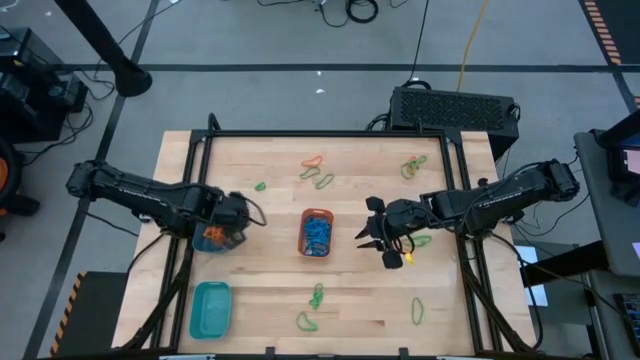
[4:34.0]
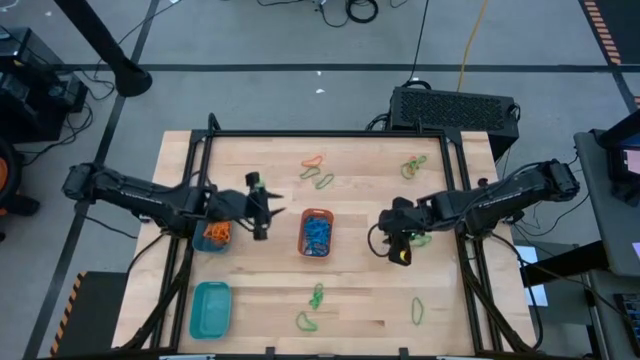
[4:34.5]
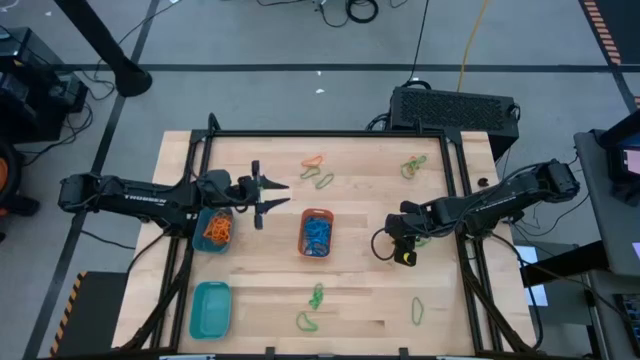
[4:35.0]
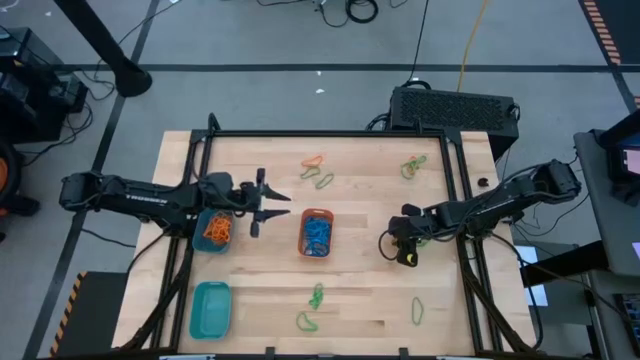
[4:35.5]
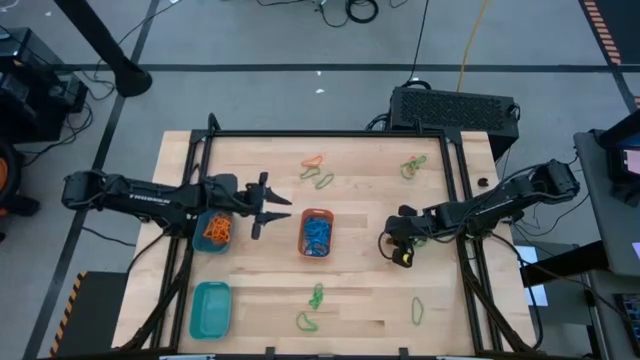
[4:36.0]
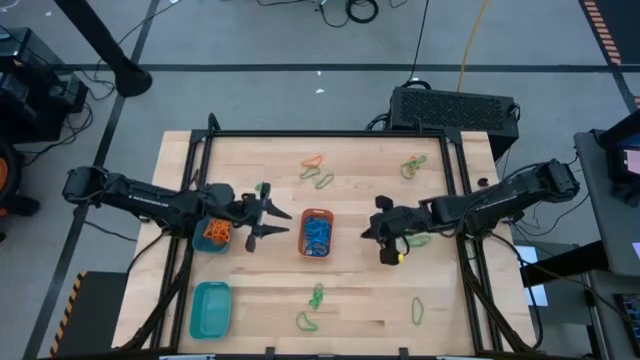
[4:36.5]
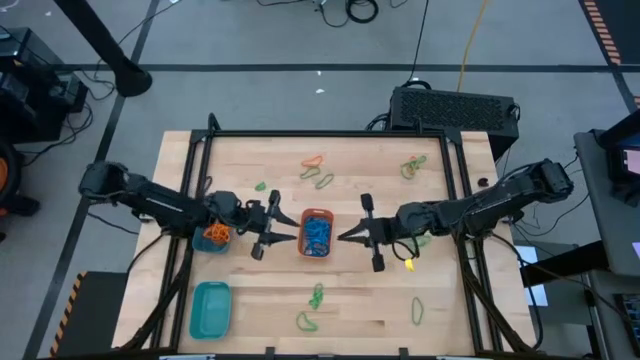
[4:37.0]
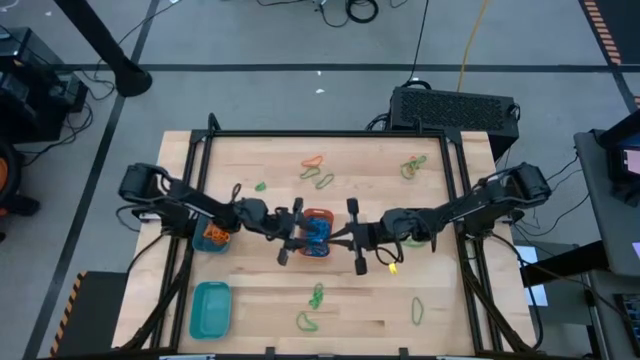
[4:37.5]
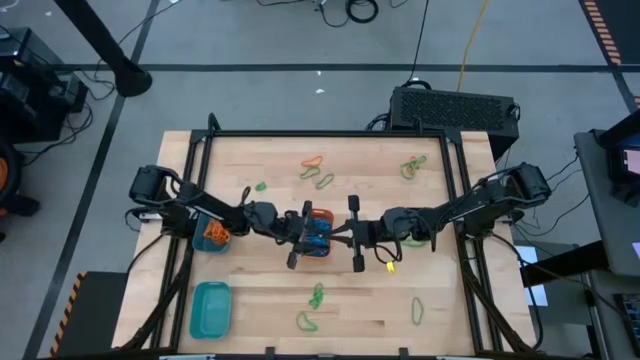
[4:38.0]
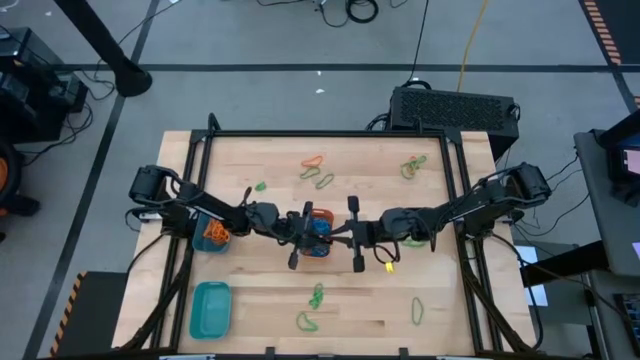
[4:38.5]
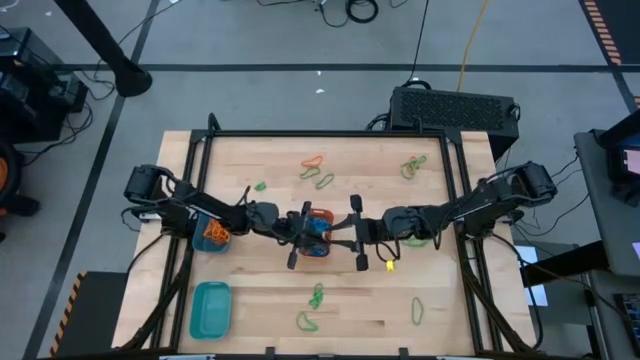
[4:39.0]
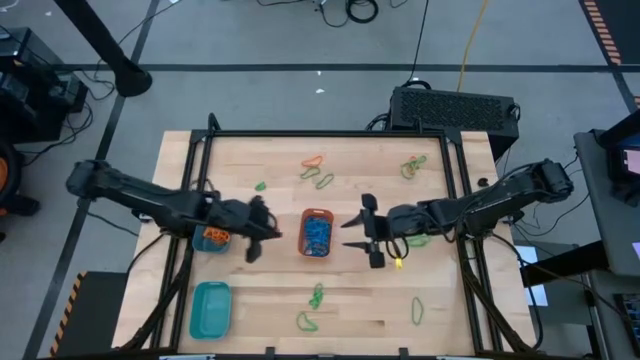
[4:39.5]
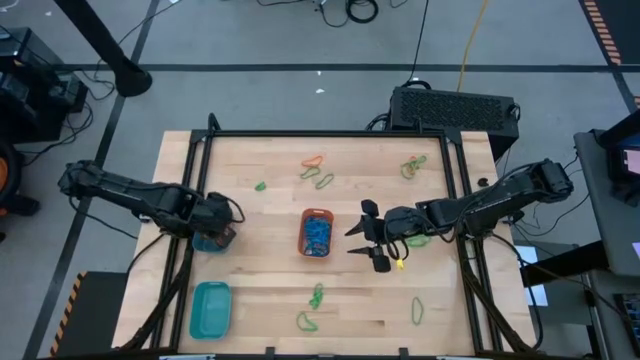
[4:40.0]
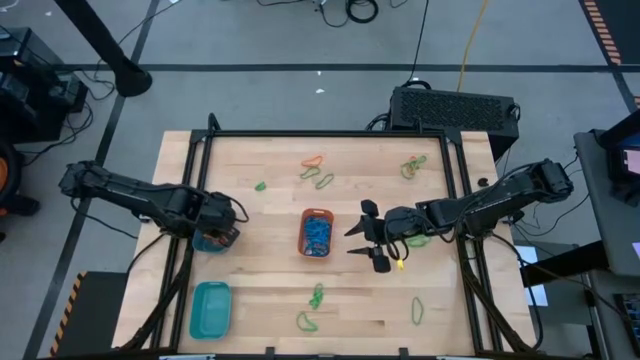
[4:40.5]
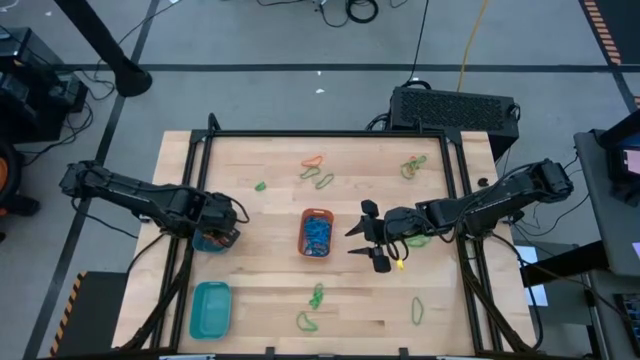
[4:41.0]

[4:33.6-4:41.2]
Task: Sort rubber bands into baskets
Put the orange rubber band into the blue bin

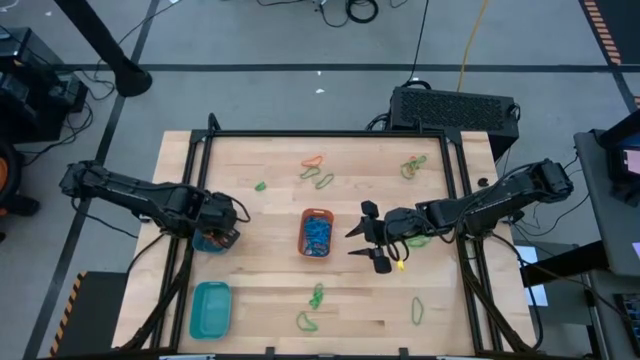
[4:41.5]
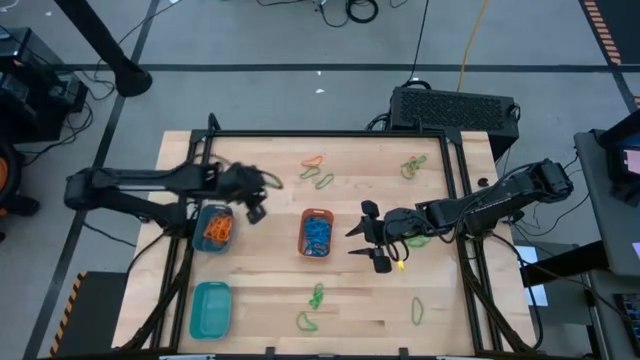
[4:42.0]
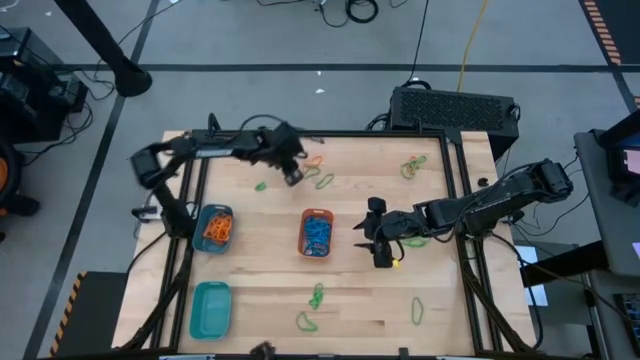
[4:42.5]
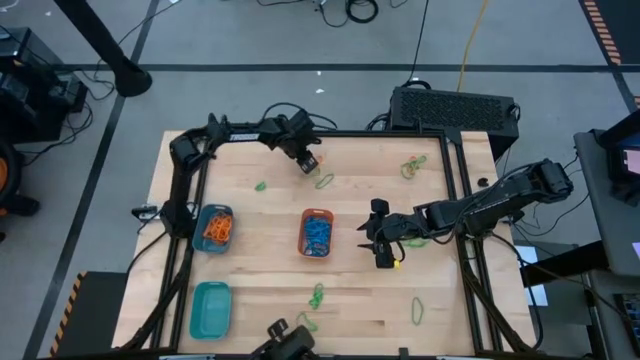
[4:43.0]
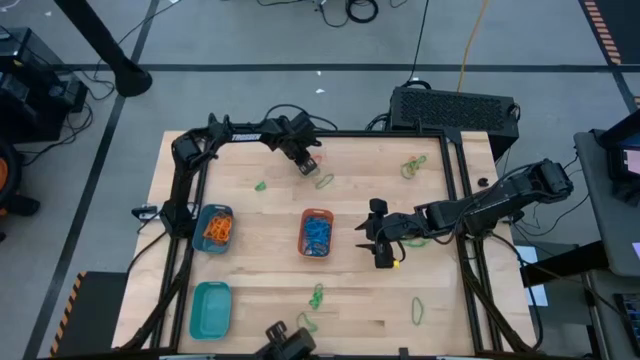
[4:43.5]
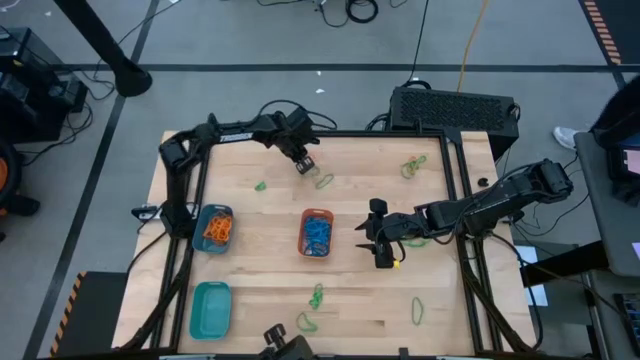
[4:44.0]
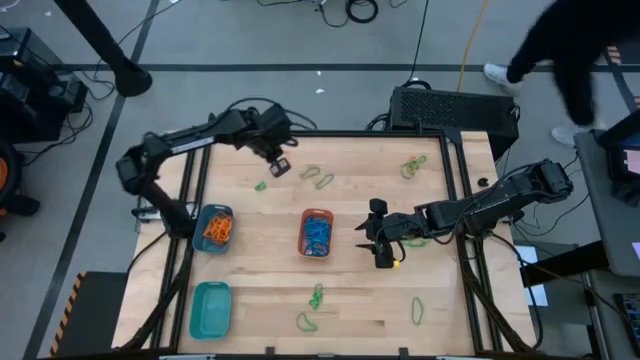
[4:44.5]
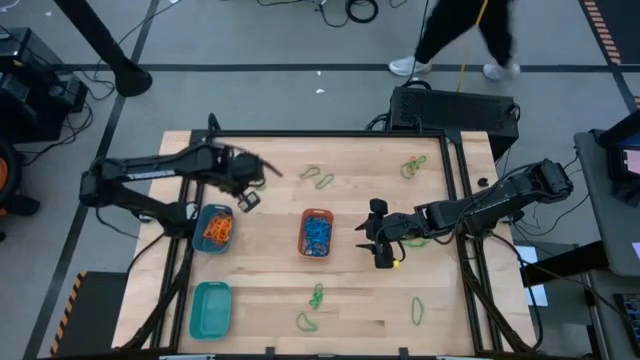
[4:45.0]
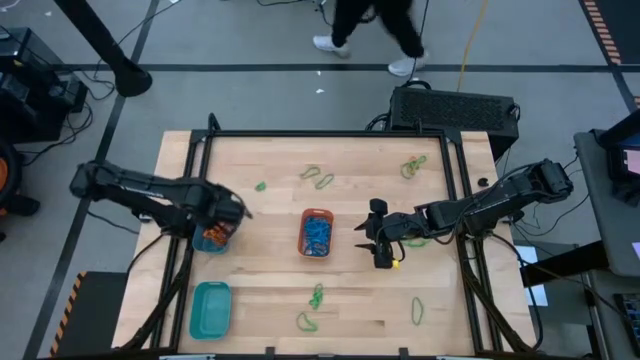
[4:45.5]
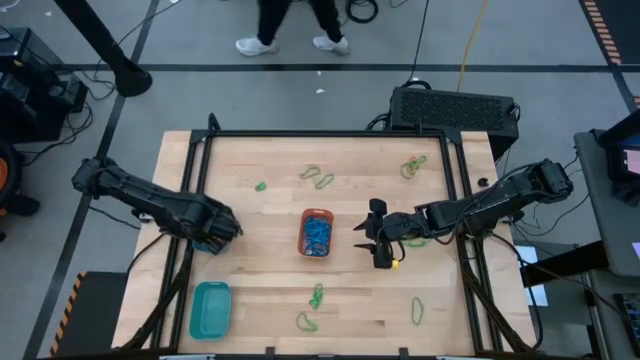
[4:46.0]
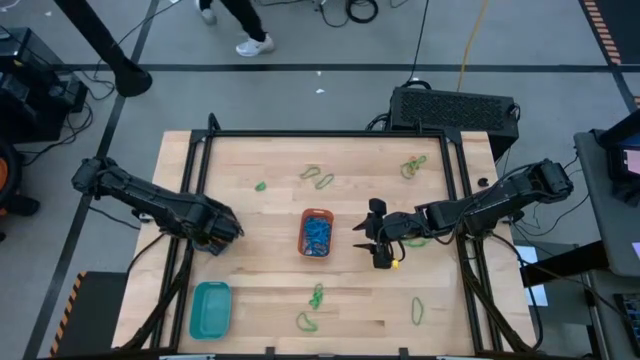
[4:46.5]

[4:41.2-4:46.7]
Put the orange rubber band into the blue bin

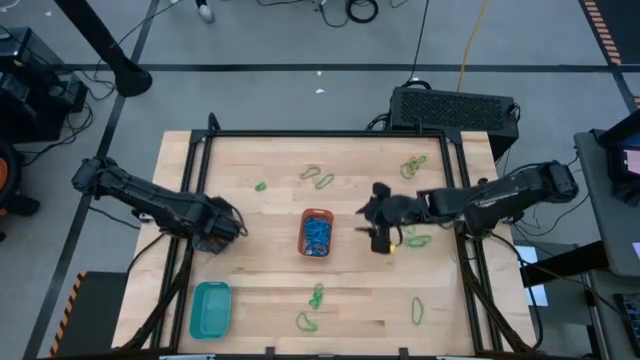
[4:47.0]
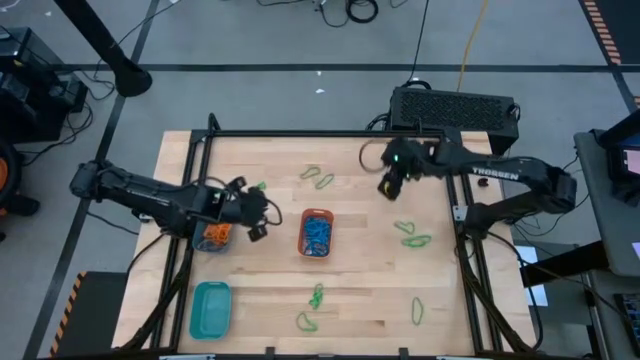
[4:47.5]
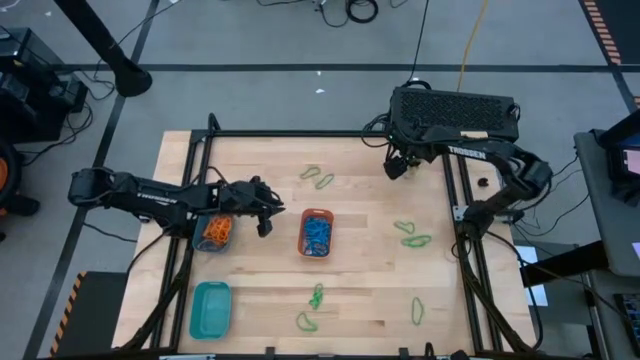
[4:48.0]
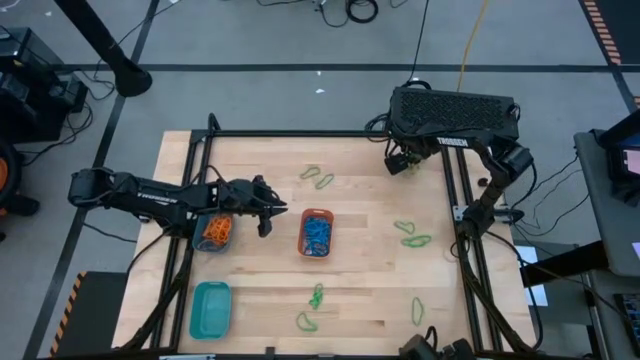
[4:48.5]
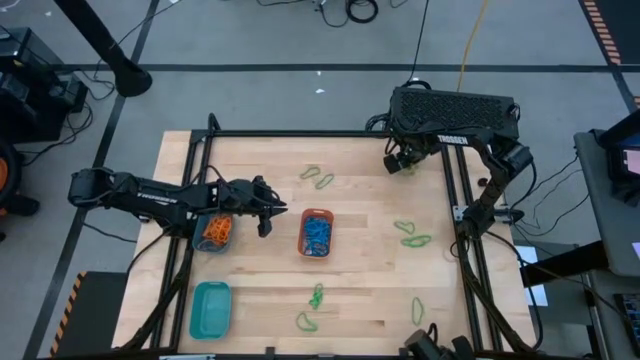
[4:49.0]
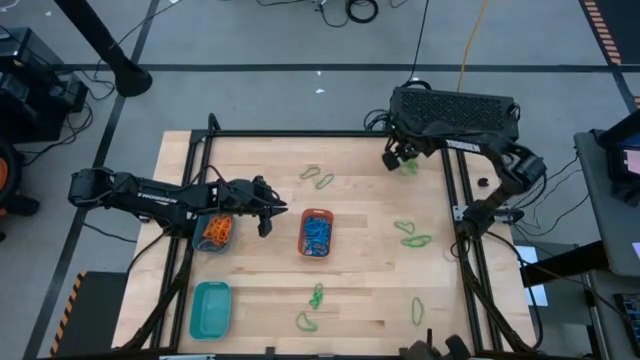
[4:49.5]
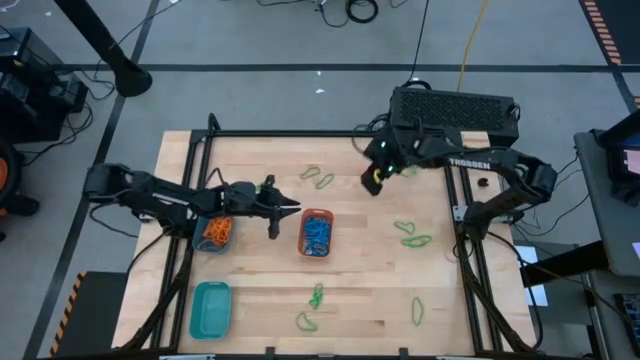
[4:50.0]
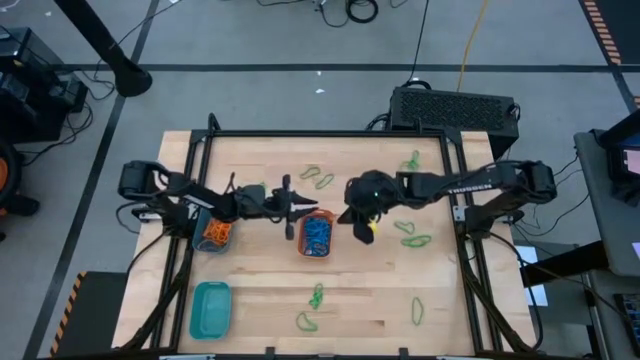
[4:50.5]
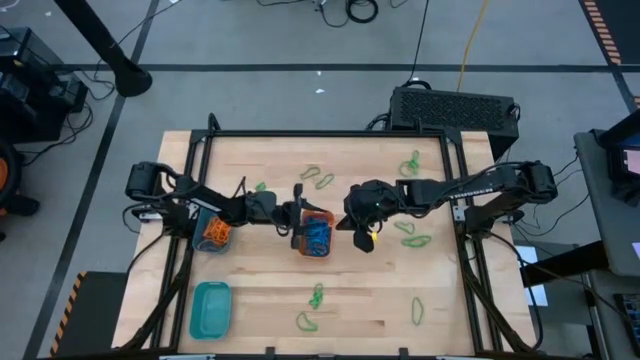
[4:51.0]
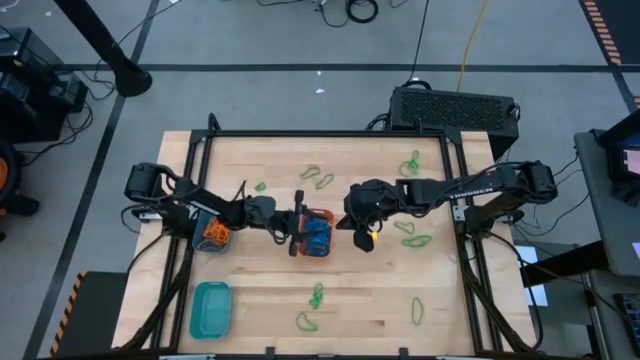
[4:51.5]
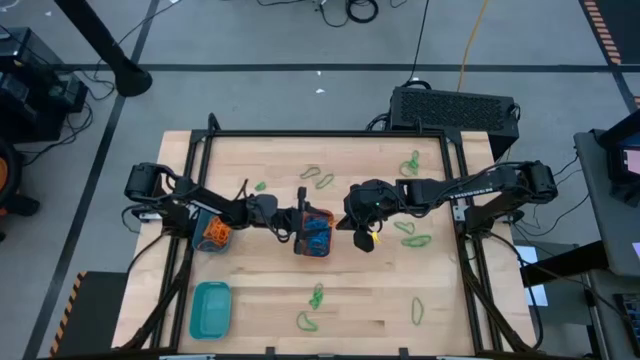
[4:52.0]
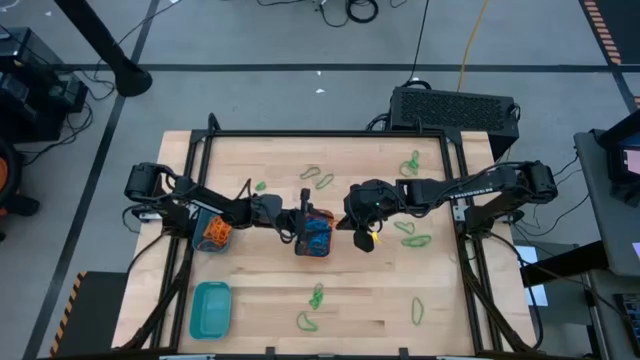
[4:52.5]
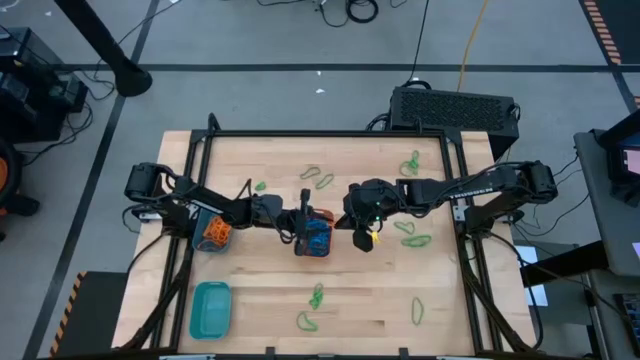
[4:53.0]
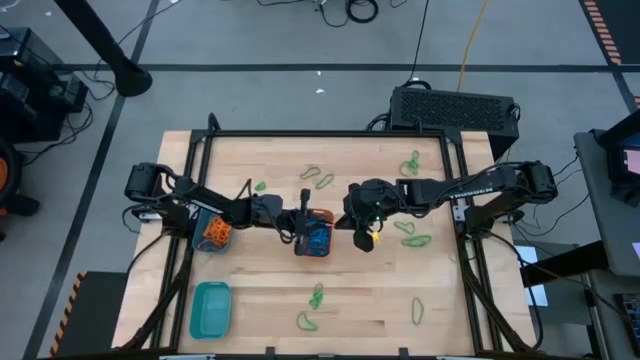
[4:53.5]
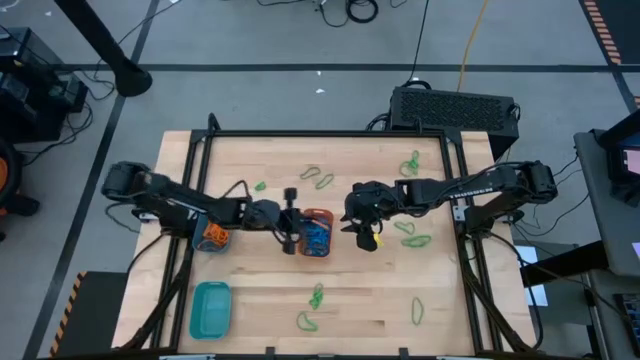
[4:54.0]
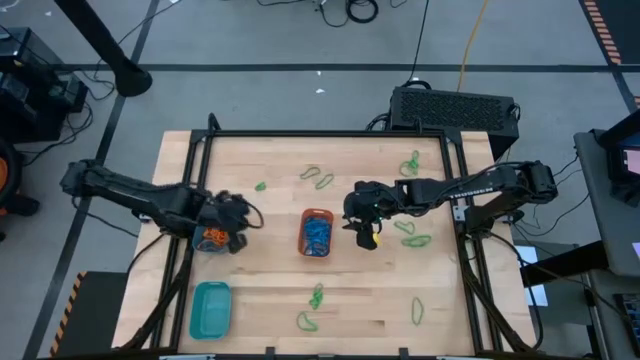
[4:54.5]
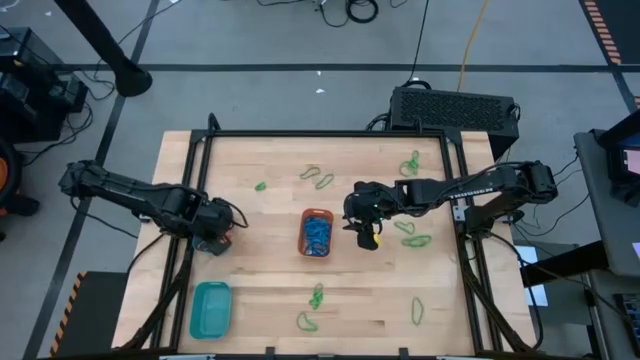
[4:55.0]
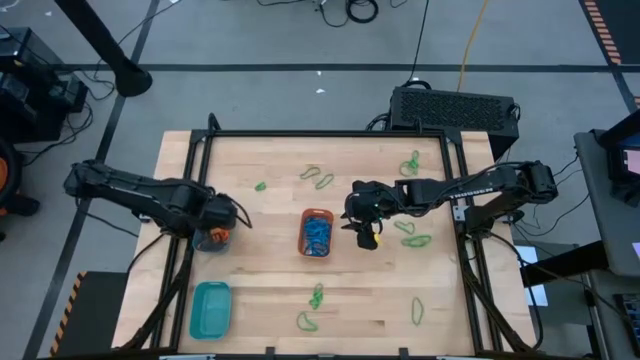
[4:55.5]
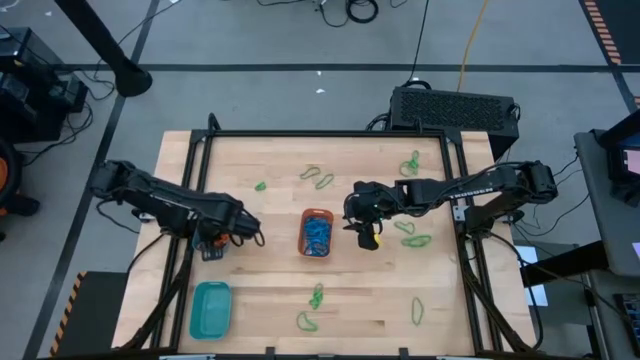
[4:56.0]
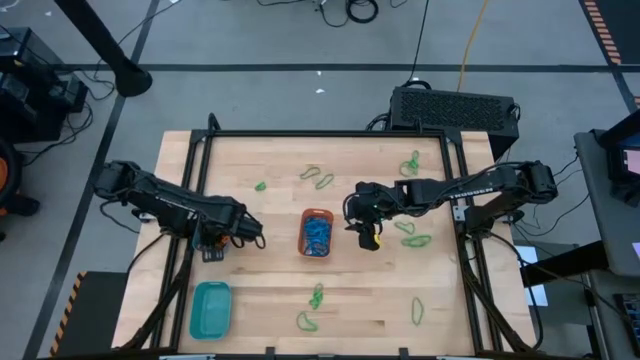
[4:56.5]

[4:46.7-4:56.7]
Put the orange rubber band into the blue bin
